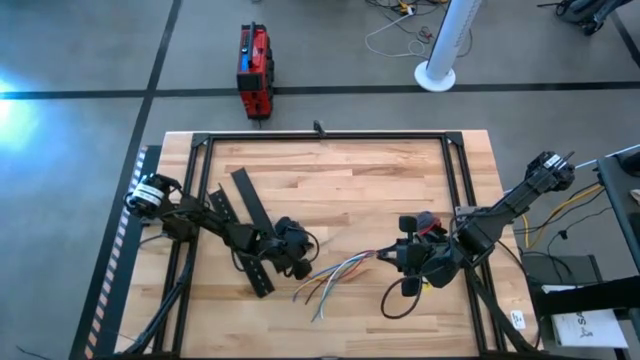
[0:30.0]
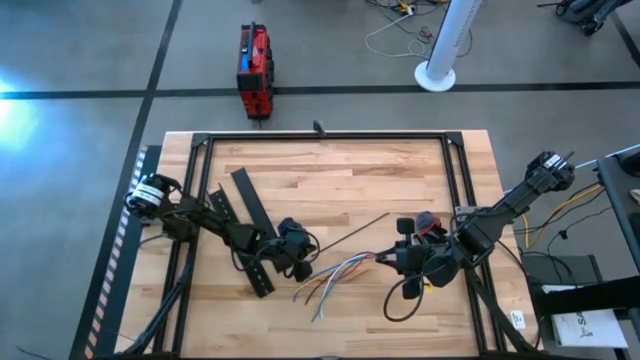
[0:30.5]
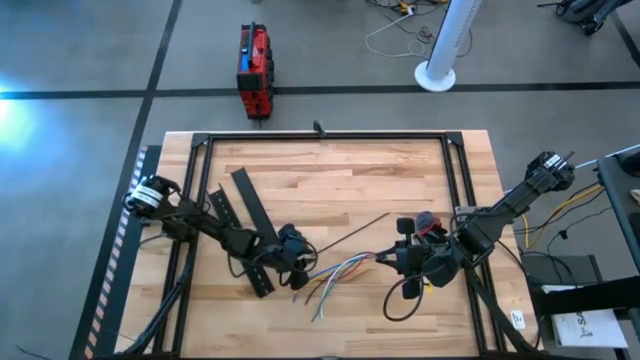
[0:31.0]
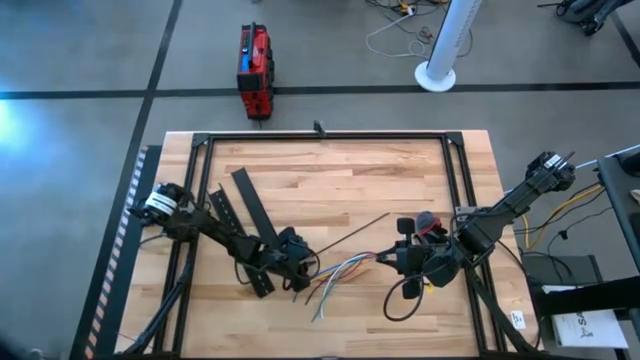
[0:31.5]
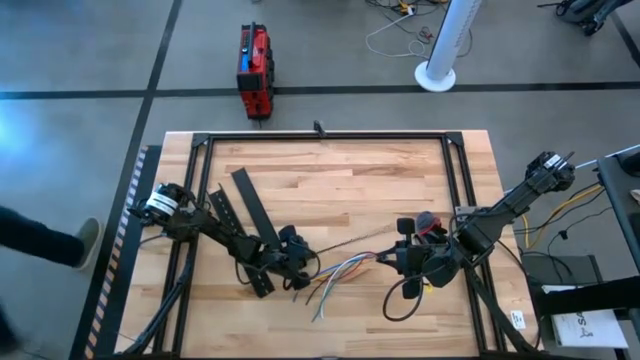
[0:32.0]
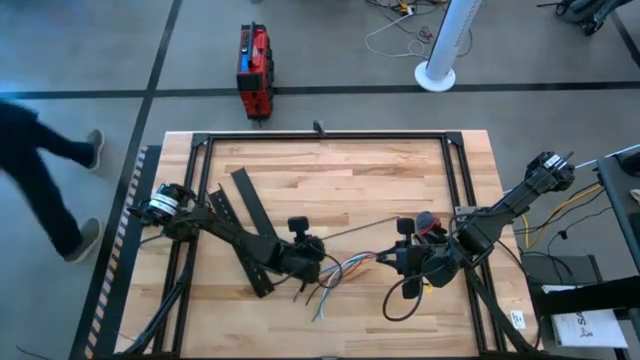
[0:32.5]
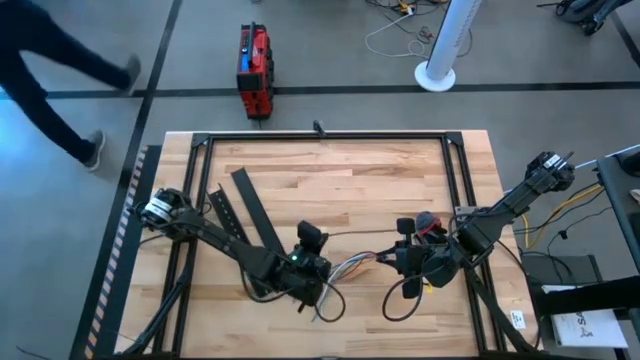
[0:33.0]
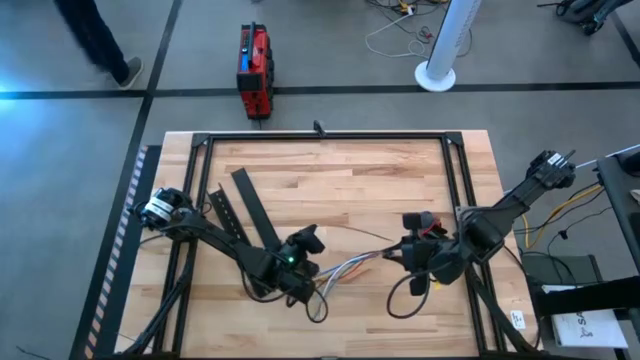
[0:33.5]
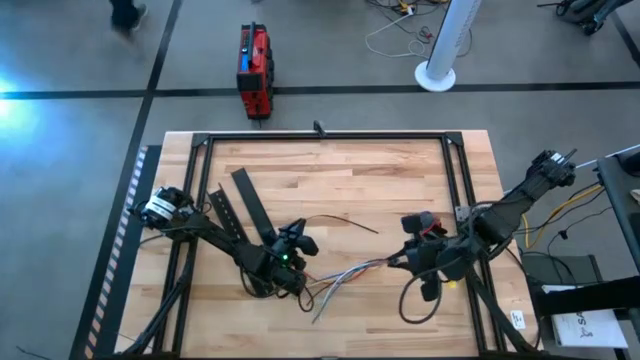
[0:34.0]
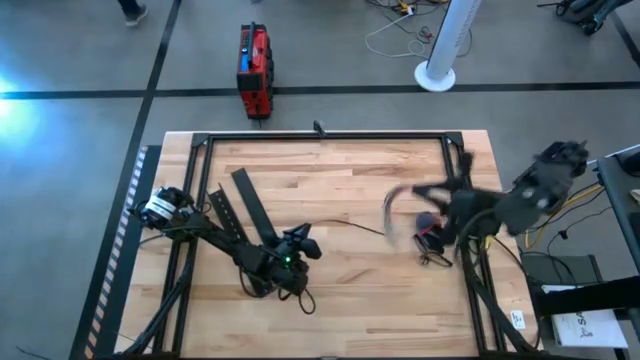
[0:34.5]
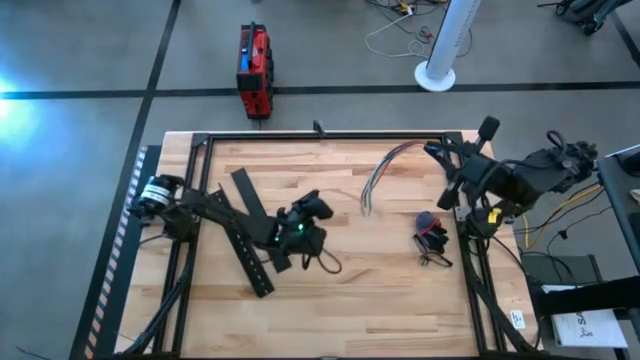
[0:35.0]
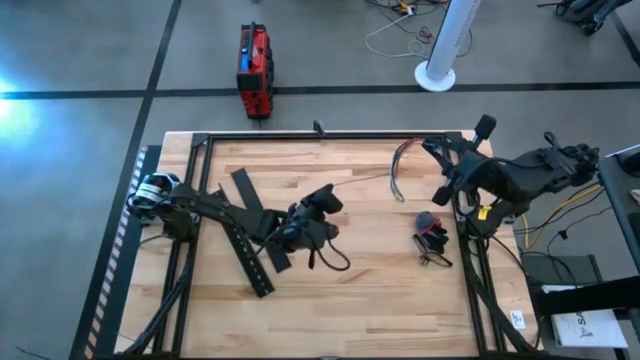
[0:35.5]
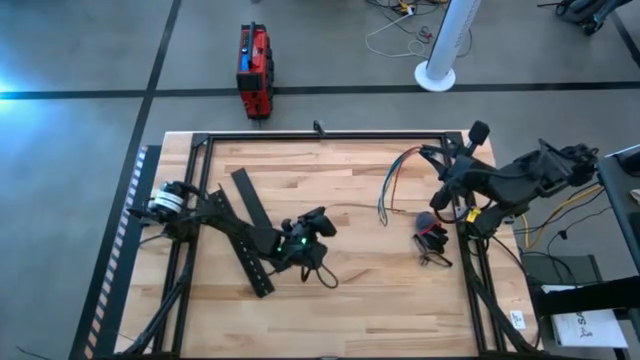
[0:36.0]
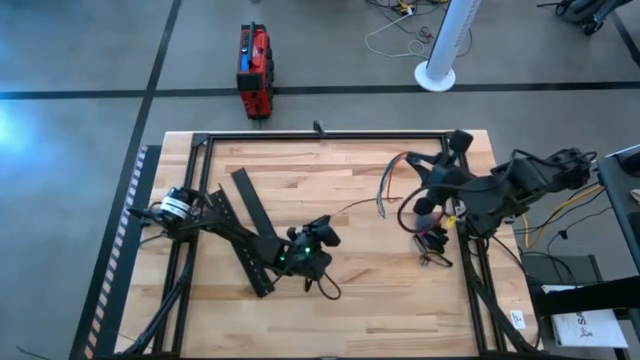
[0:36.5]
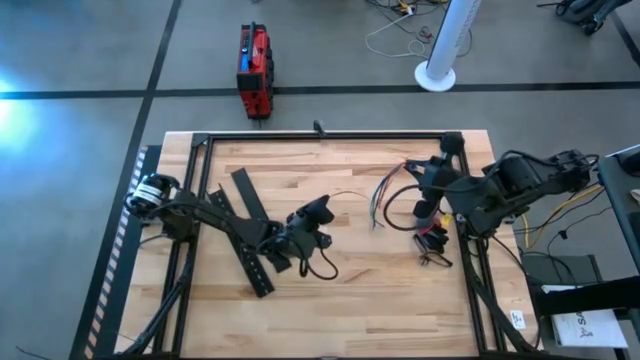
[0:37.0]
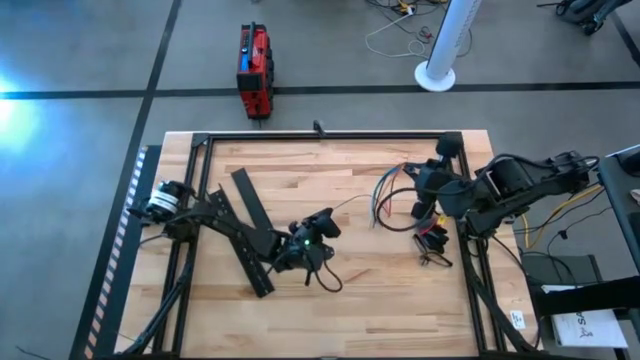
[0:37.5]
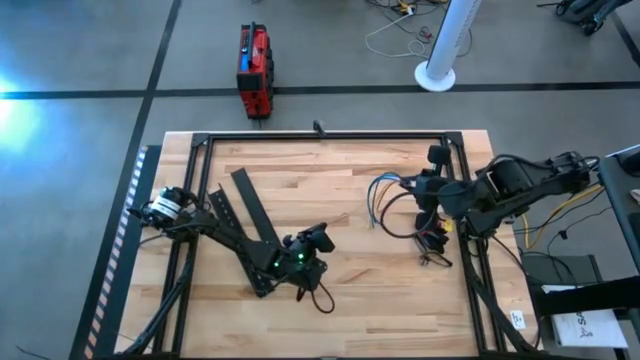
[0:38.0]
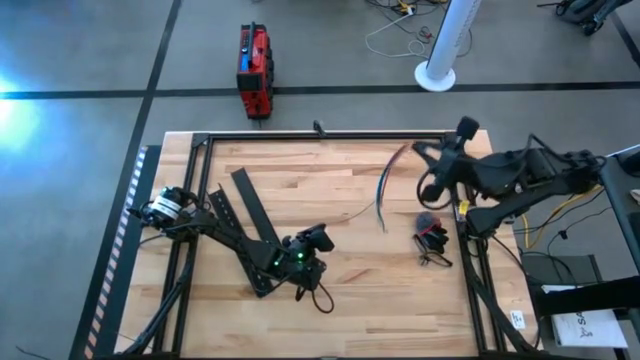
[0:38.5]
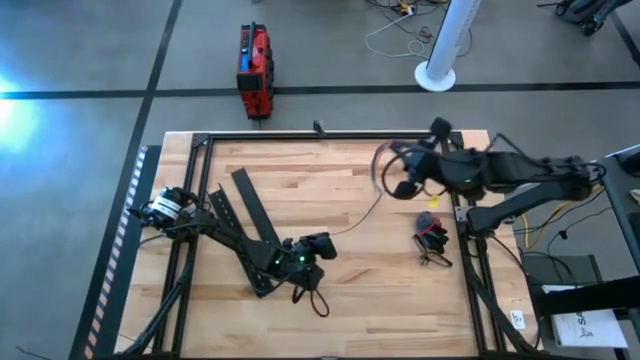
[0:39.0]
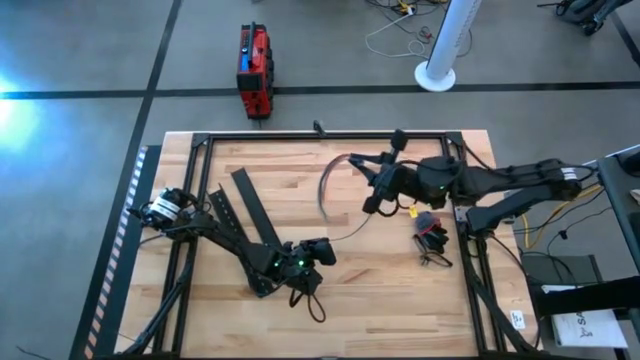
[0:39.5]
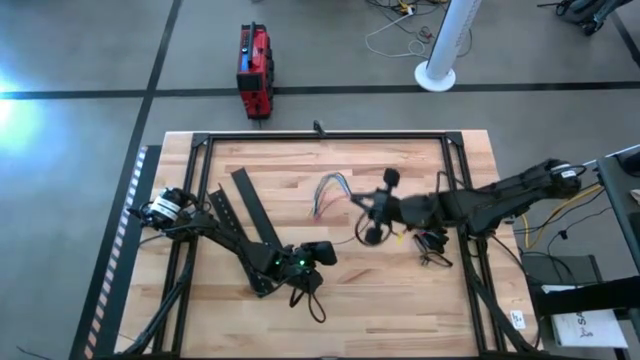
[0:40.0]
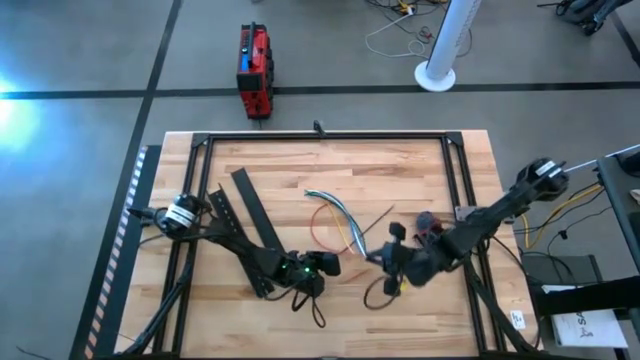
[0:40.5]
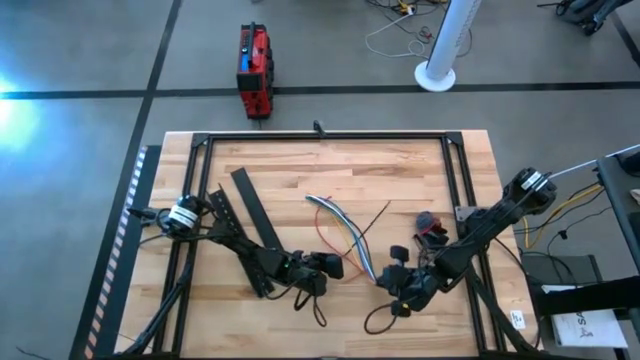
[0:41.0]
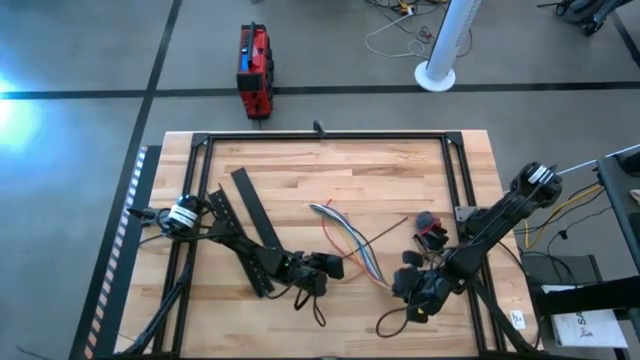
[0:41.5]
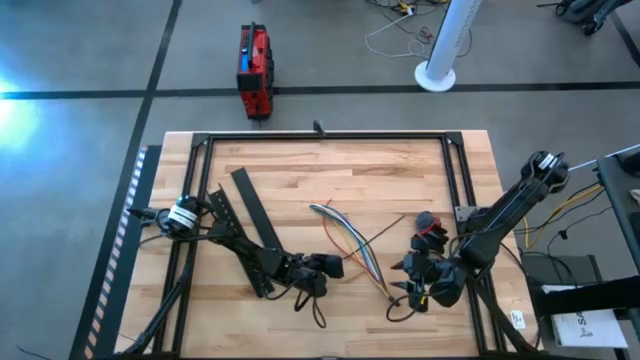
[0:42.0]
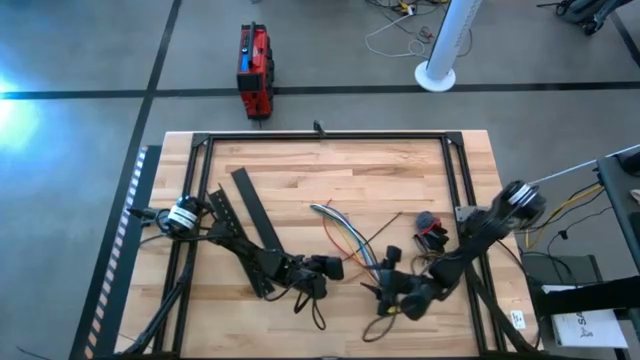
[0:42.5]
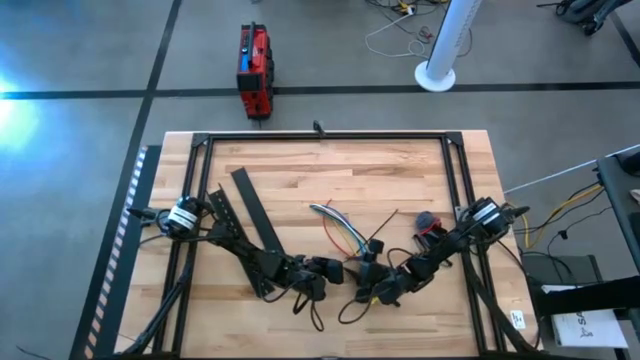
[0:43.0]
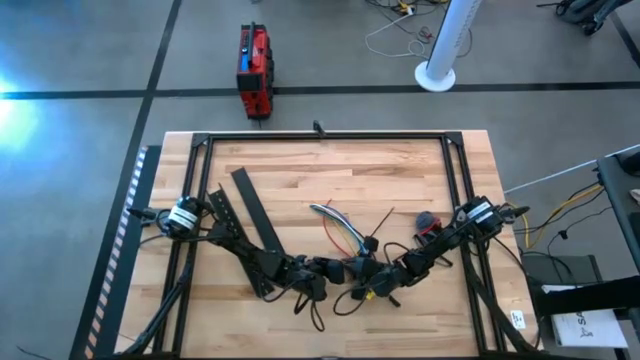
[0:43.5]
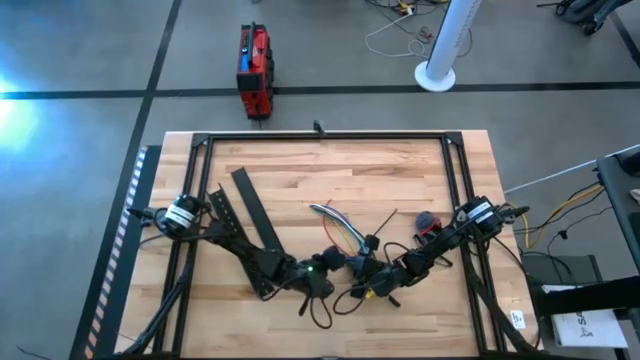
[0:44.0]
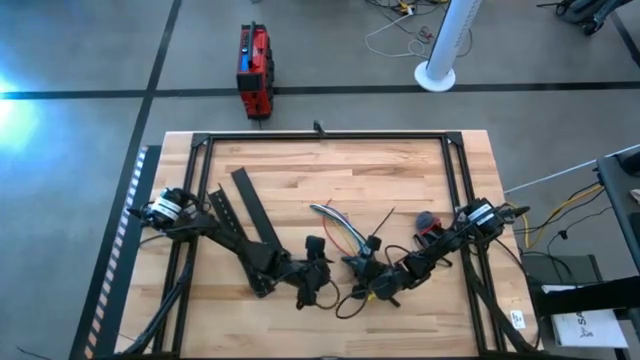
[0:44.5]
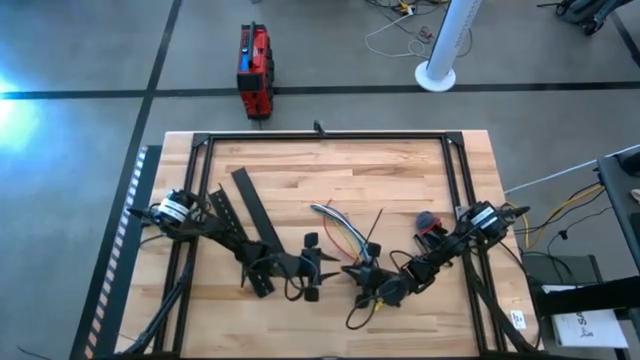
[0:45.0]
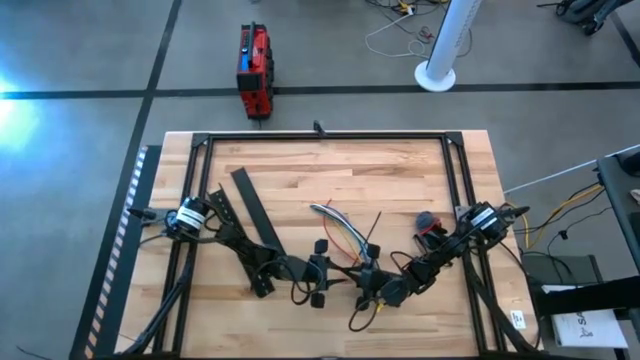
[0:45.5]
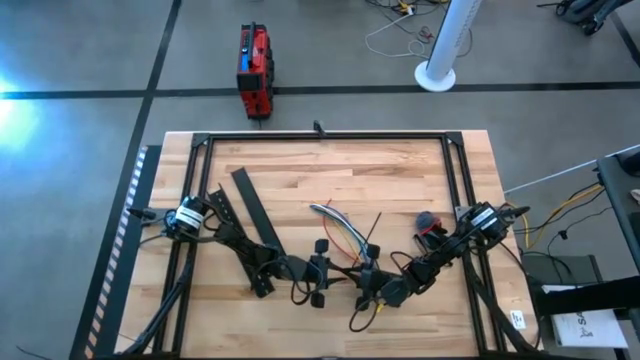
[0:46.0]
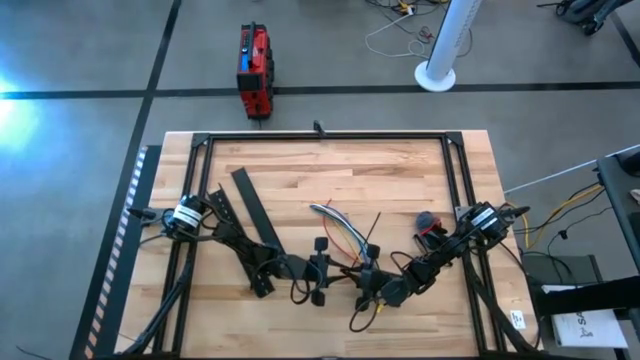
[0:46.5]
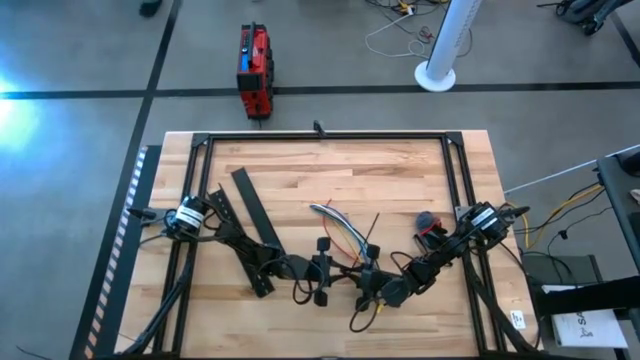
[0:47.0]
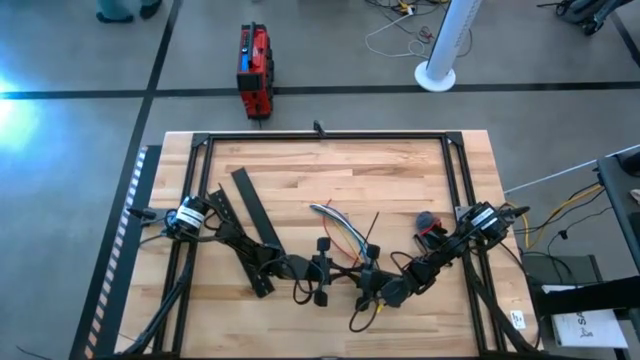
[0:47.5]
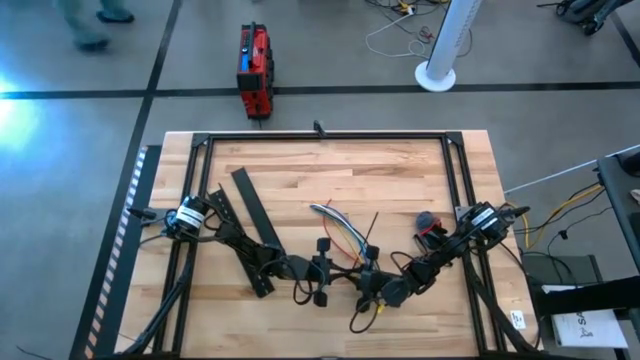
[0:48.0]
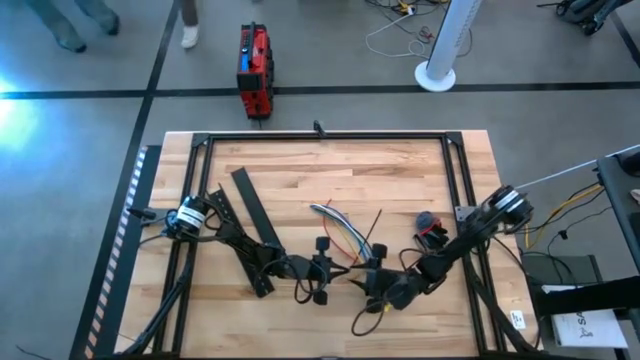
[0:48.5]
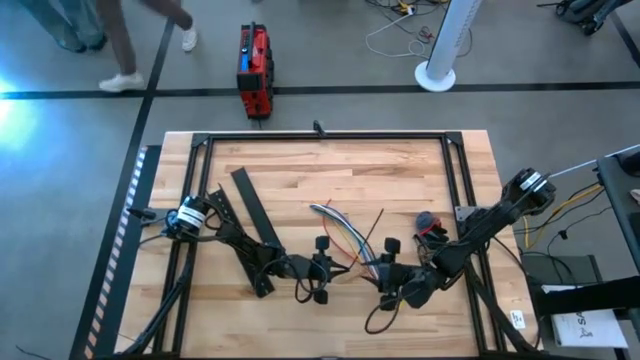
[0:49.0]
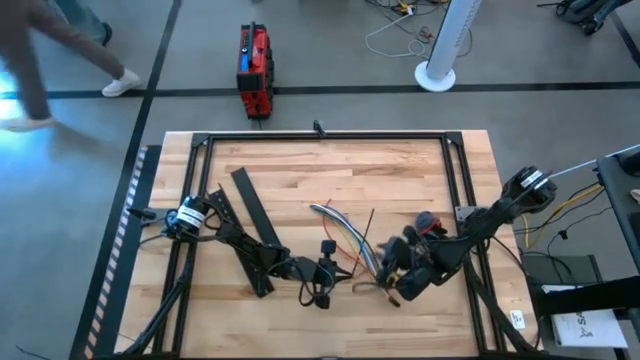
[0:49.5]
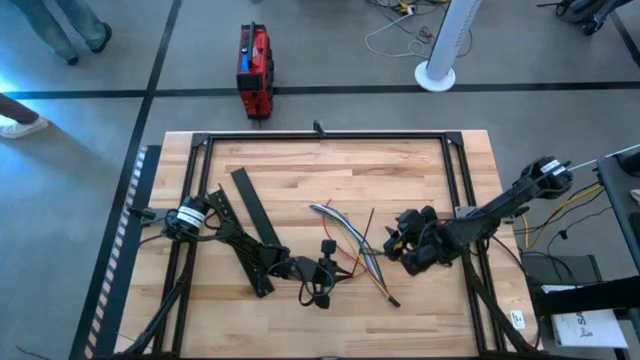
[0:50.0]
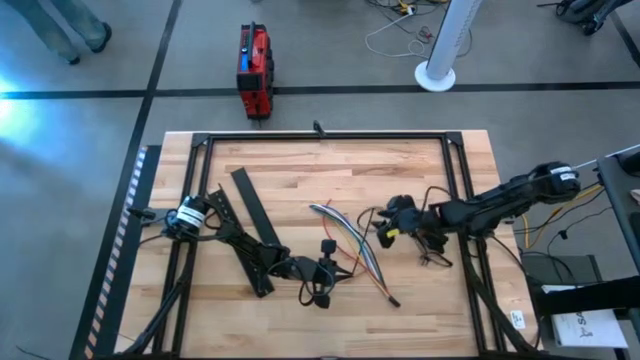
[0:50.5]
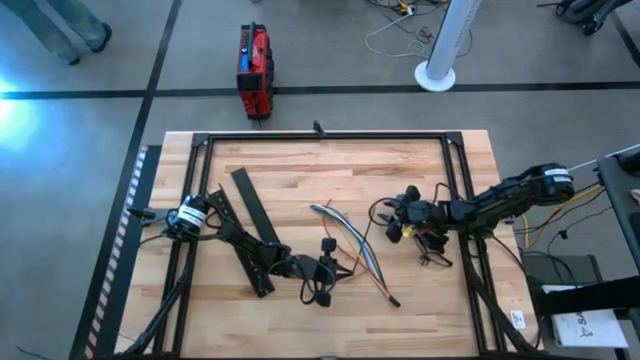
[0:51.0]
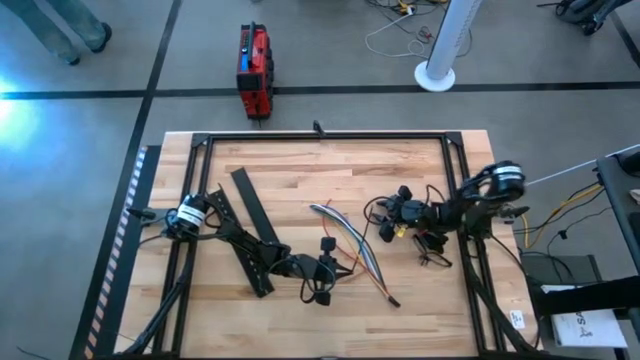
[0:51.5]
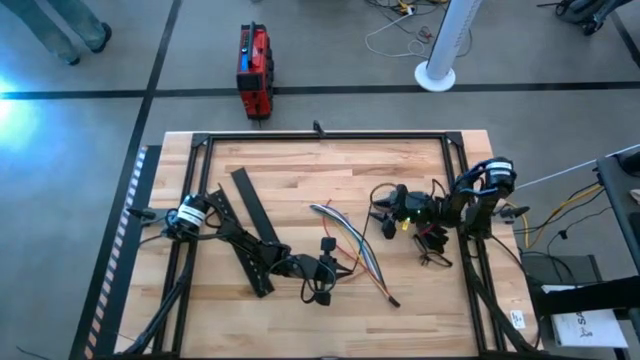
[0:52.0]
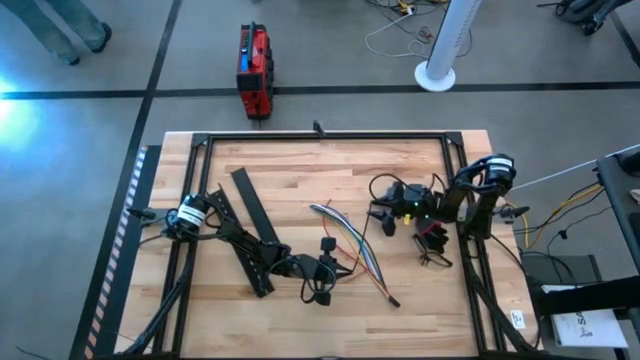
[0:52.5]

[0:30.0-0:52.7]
Task: Ziptie cables
Wrap the cable wires with the black zip tie
